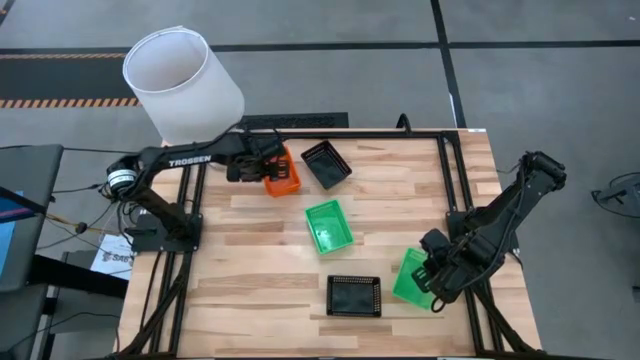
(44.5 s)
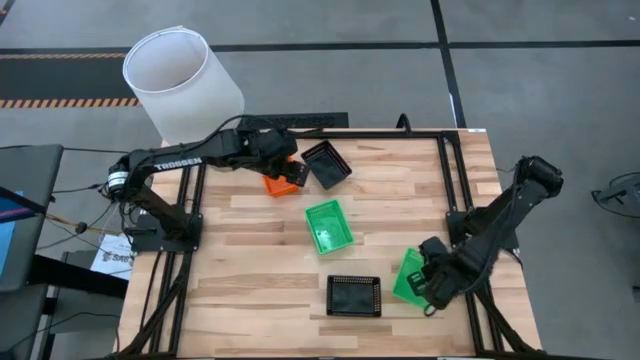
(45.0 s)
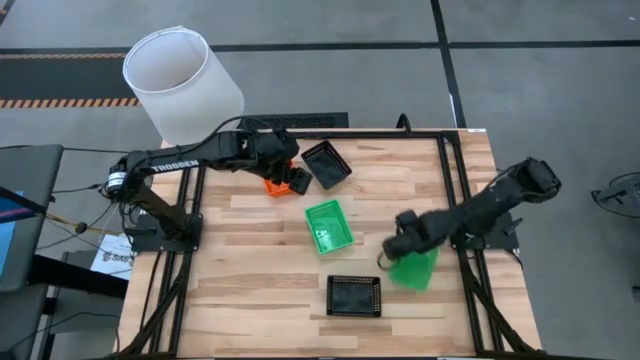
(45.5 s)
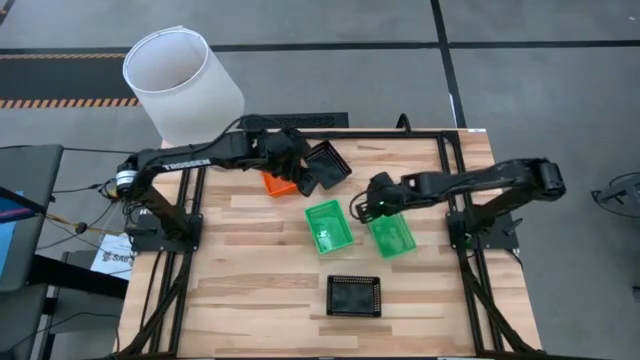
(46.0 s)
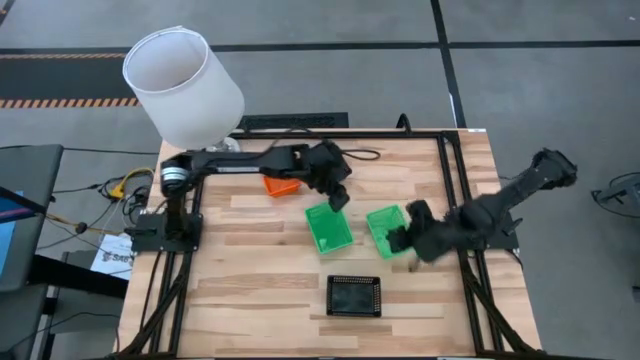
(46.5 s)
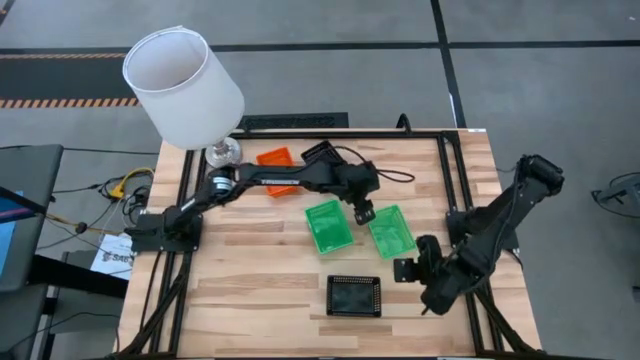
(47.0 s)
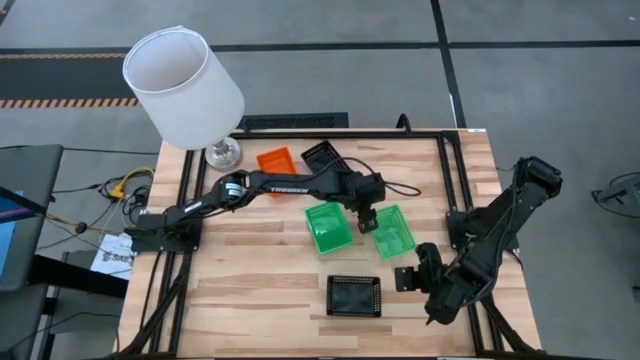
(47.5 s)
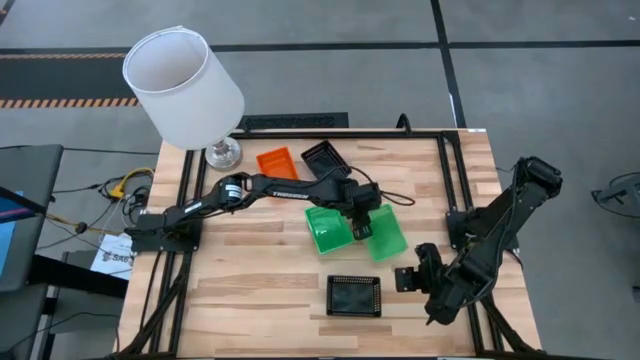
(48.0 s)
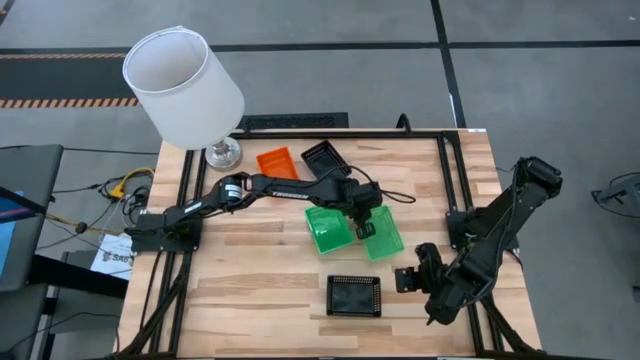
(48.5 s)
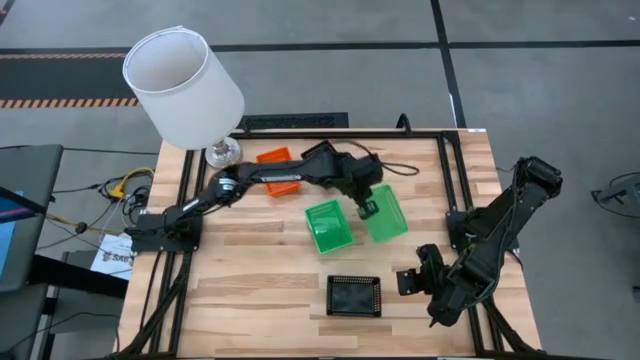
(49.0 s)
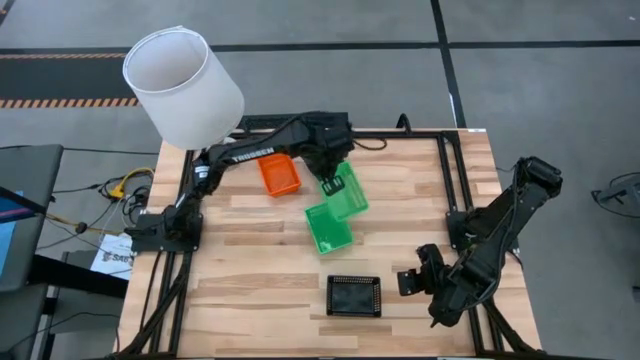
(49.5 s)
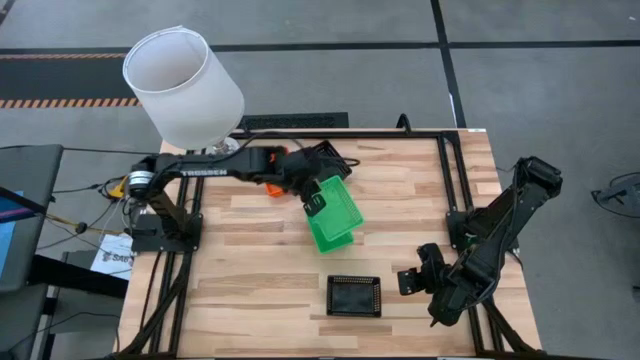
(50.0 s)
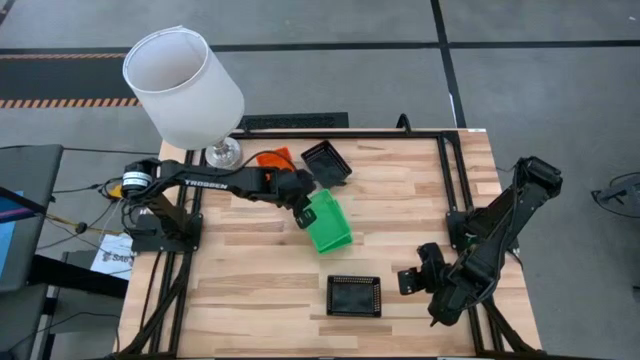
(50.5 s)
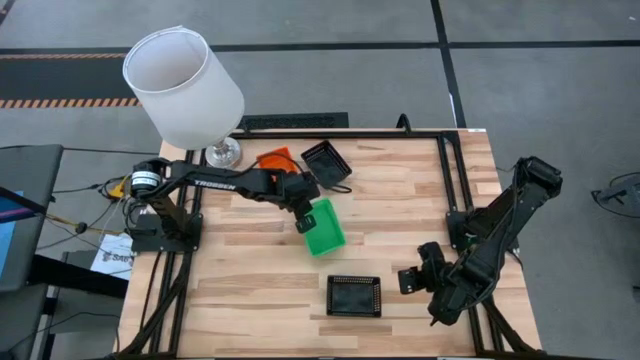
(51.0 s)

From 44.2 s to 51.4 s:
Stack the green bin on top of the stacked green bins

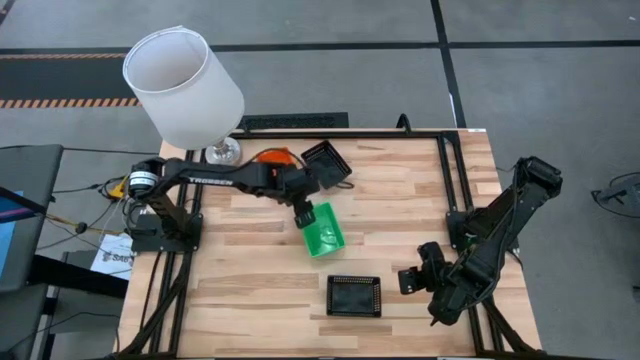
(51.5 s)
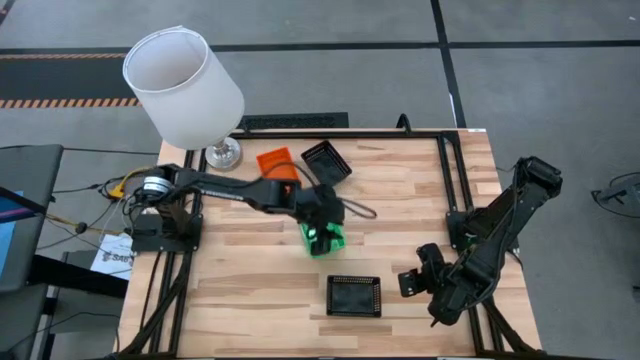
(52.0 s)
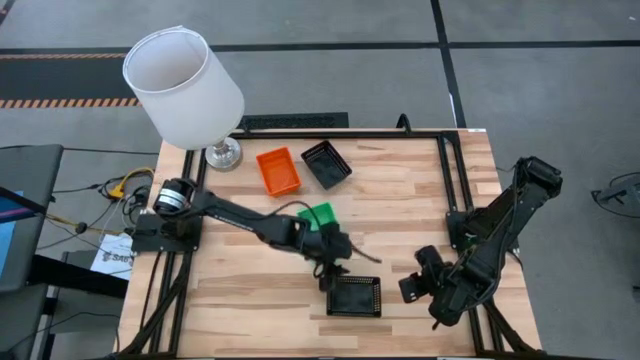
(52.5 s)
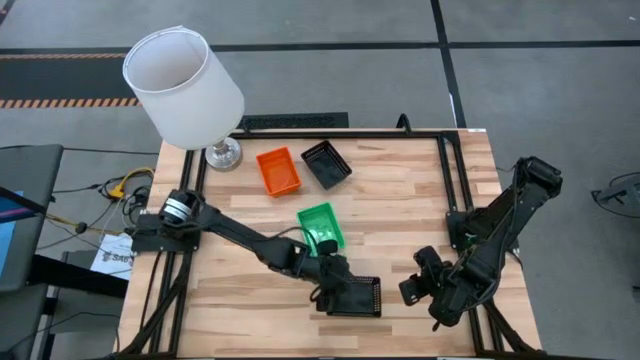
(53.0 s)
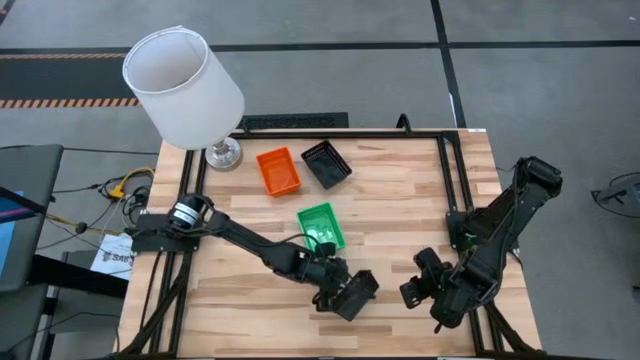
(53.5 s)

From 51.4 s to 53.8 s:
Stack the black bin on top of the stacked black bins

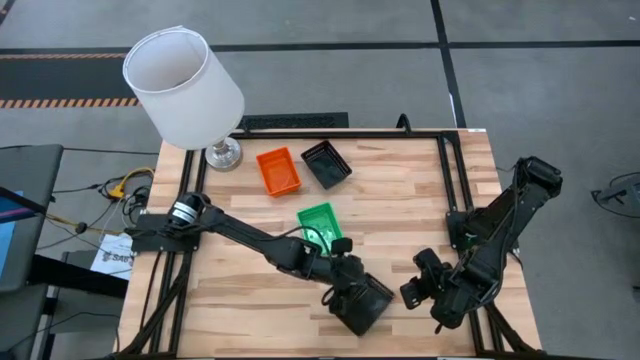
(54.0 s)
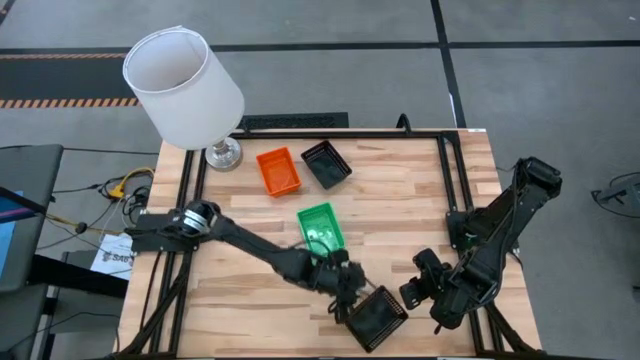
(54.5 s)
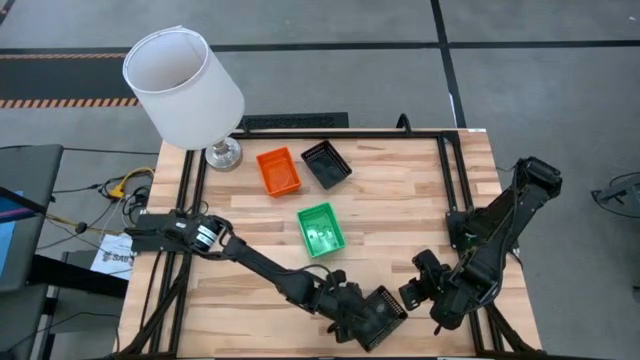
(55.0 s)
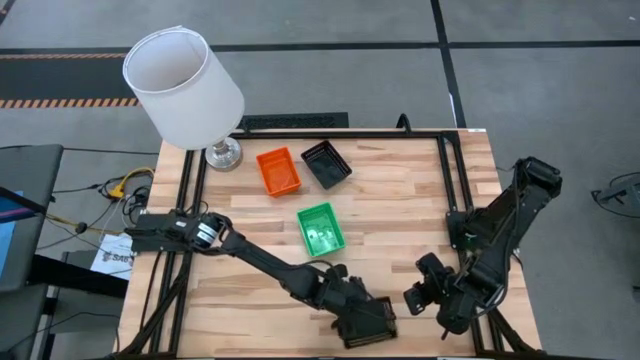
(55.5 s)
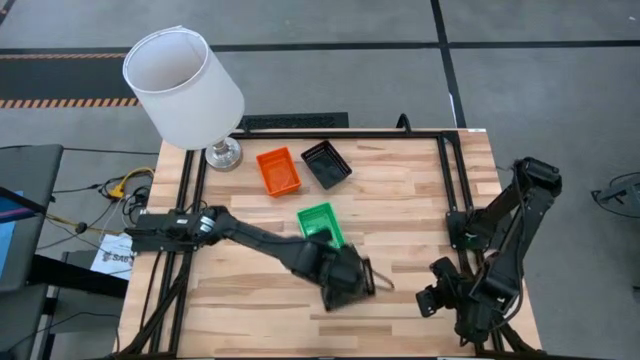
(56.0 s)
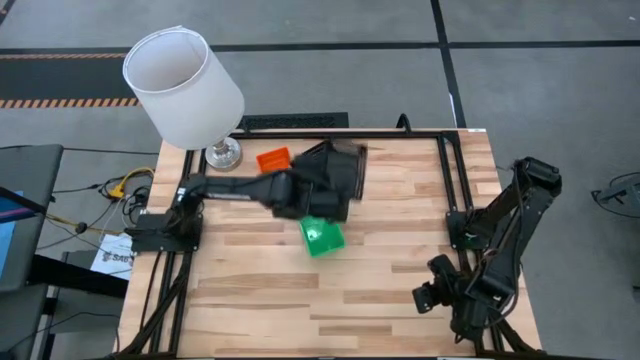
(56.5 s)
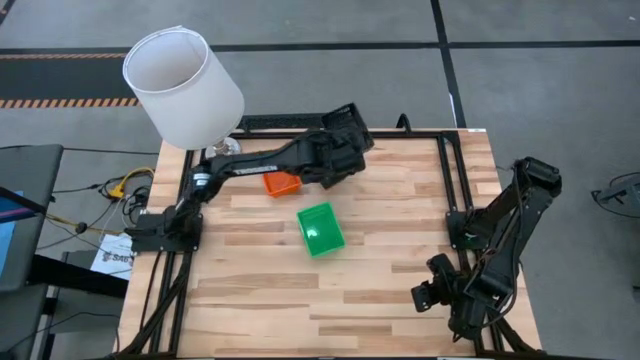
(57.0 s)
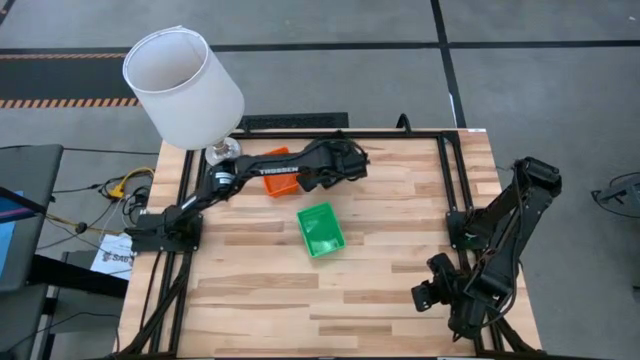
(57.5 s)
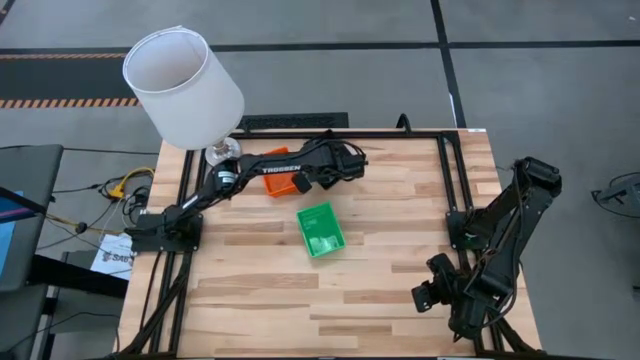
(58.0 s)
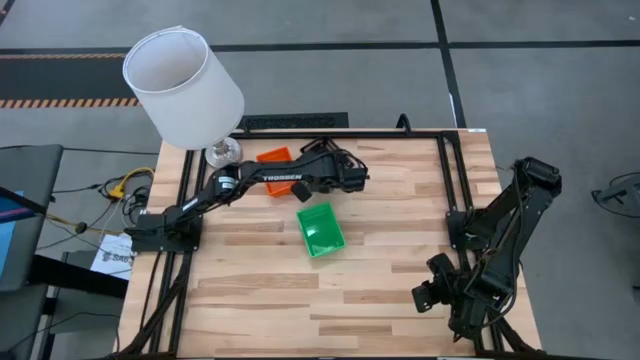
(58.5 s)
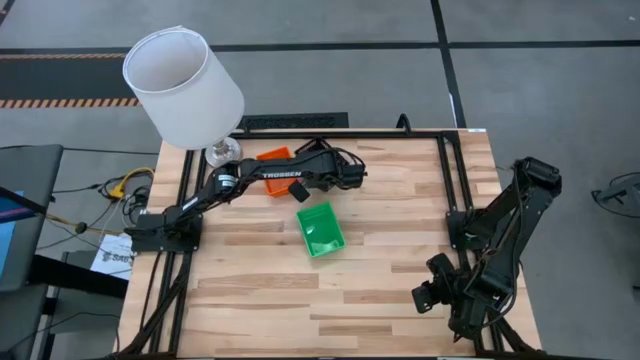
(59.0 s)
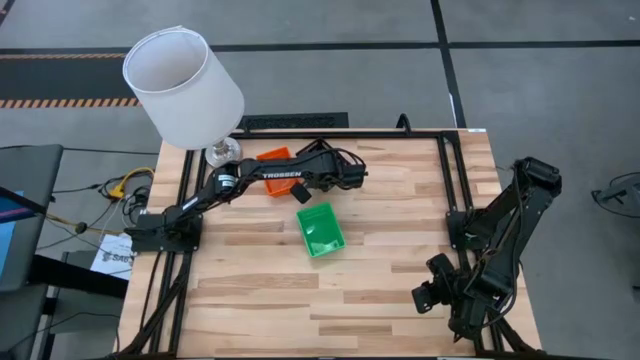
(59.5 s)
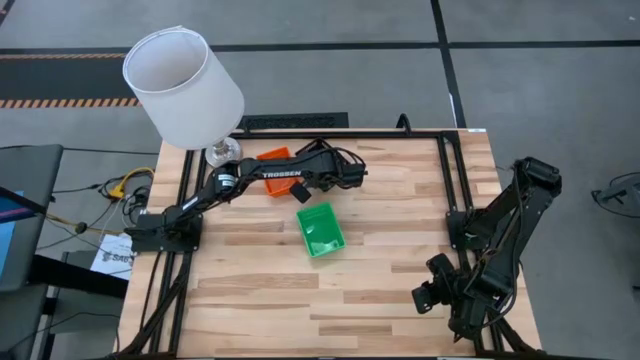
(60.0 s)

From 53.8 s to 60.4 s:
Stack the black bin on top of the stacked black bins

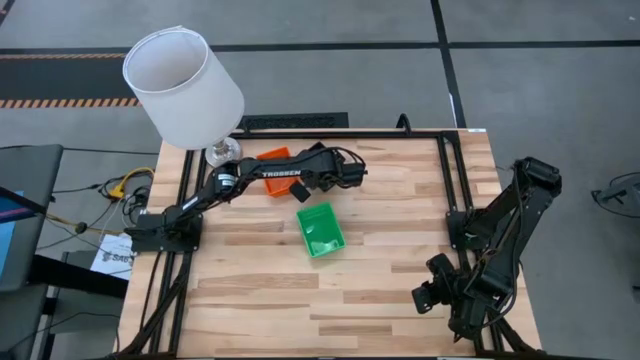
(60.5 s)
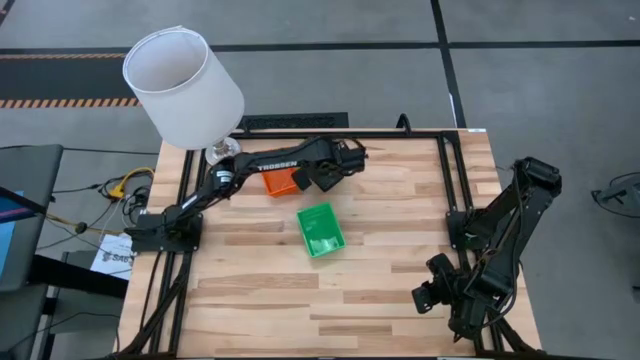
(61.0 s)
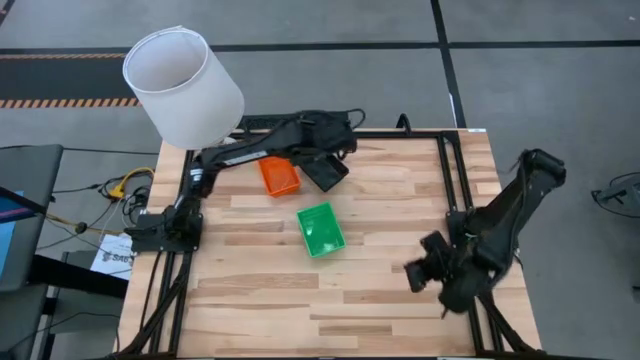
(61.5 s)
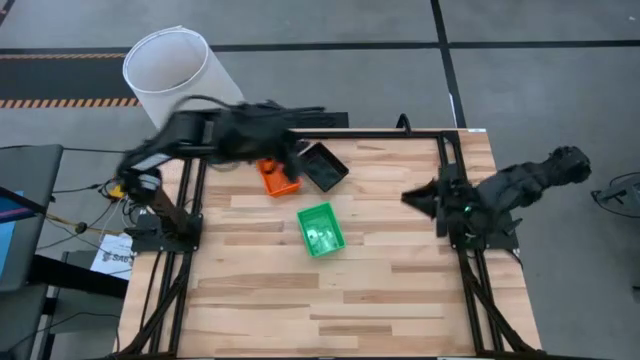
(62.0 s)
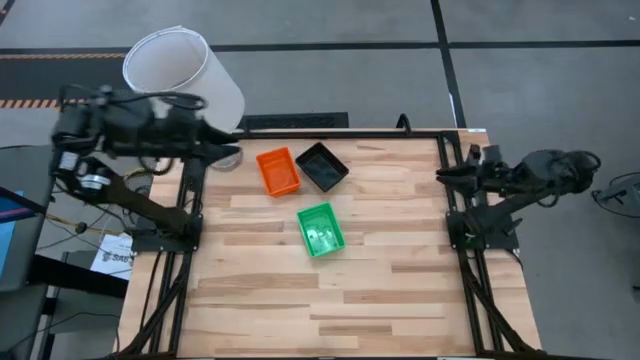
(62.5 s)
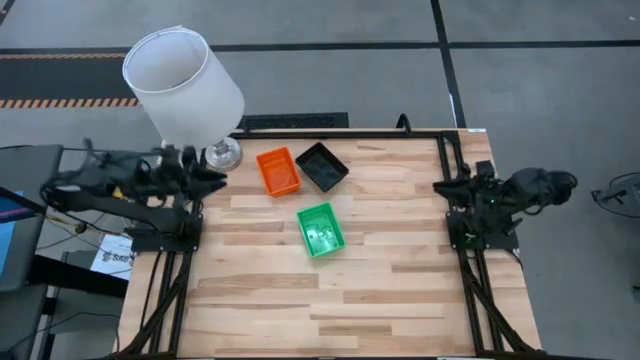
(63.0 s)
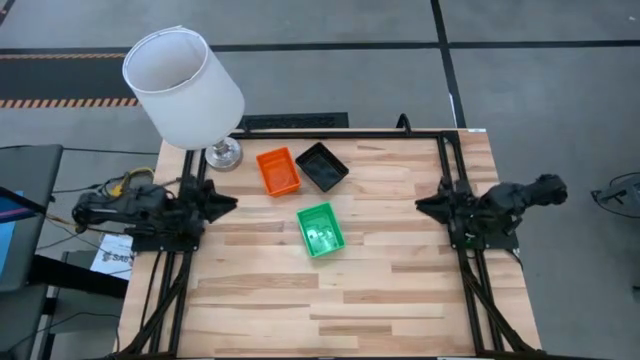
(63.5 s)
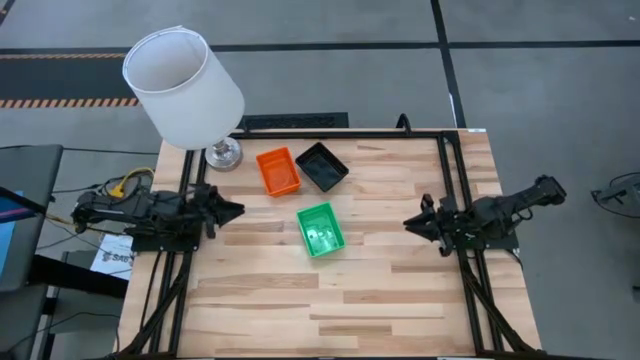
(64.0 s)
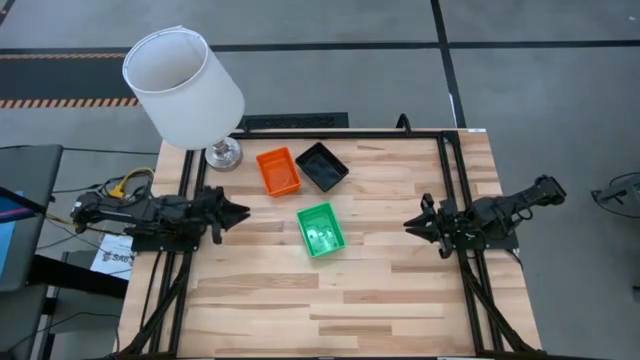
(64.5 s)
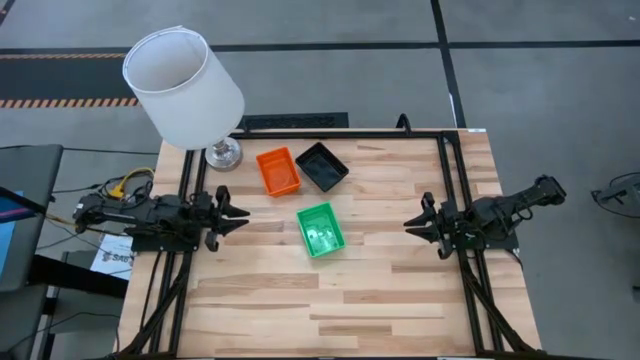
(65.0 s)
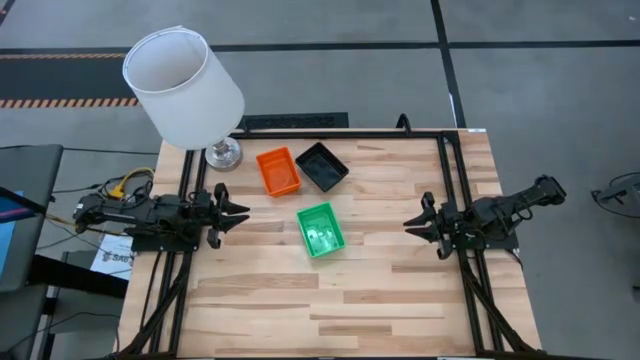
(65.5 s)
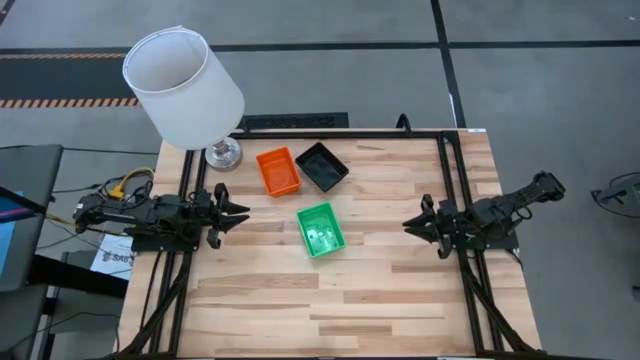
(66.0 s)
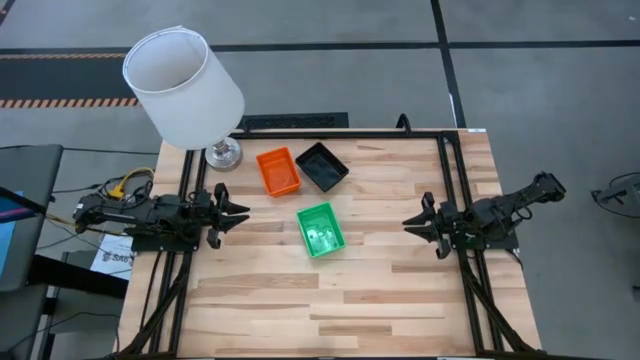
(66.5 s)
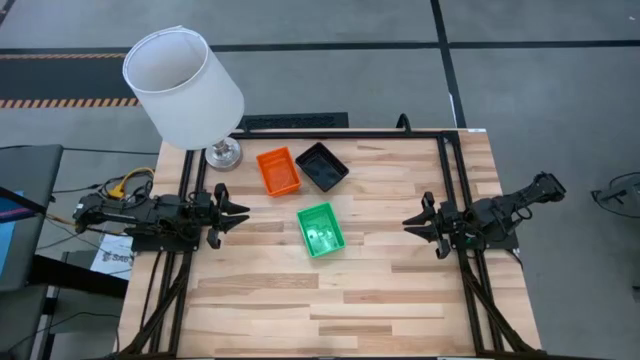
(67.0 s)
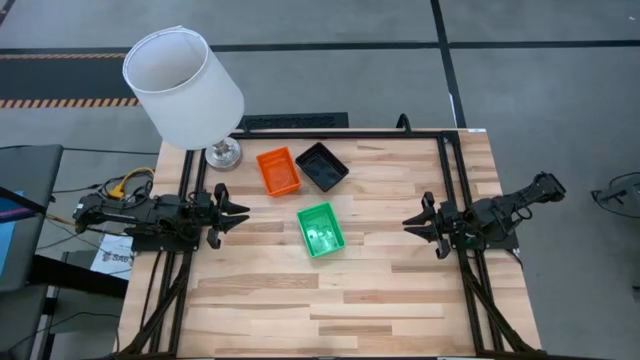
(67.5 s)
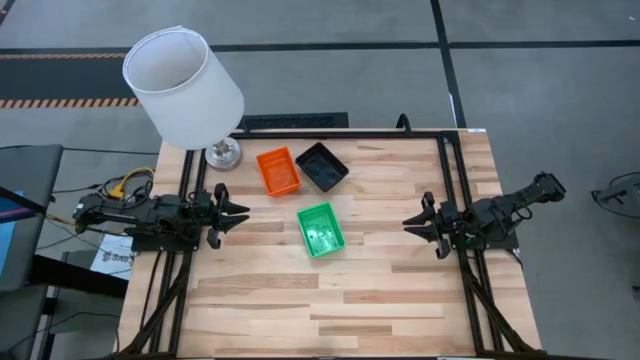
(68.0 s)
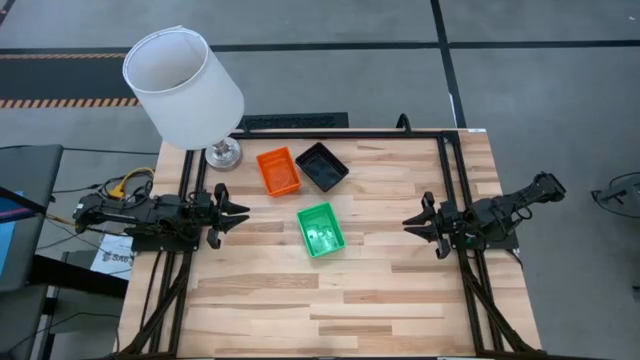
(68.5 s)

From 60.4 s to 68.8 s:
Return to Home Position
